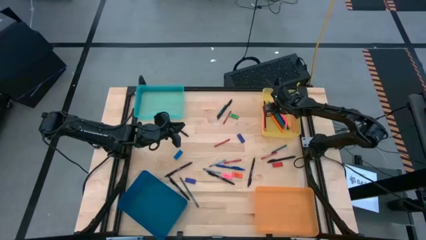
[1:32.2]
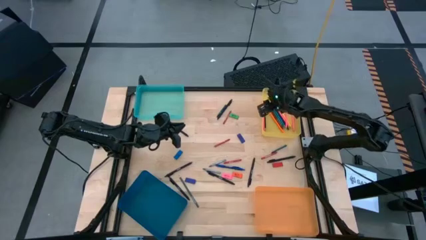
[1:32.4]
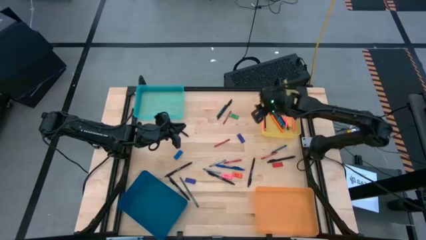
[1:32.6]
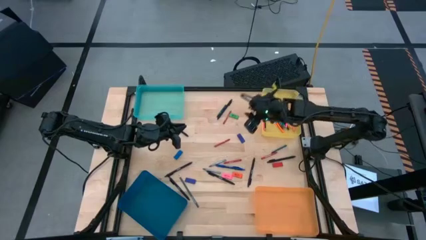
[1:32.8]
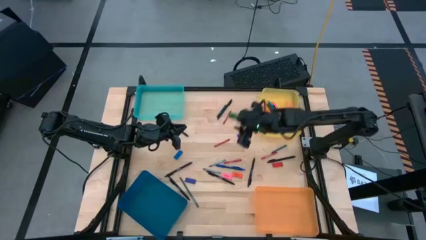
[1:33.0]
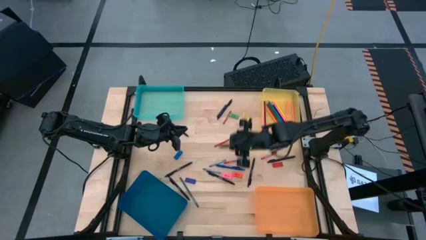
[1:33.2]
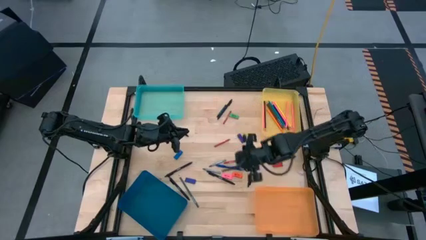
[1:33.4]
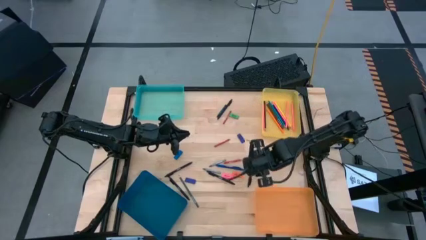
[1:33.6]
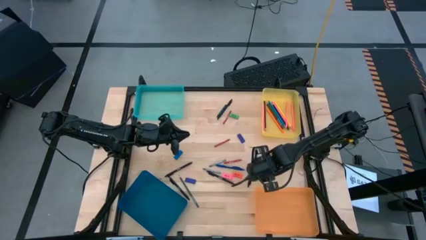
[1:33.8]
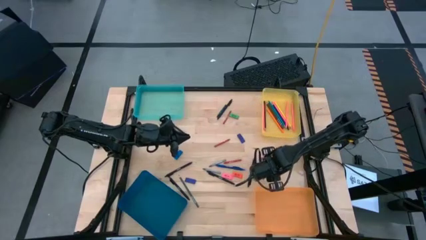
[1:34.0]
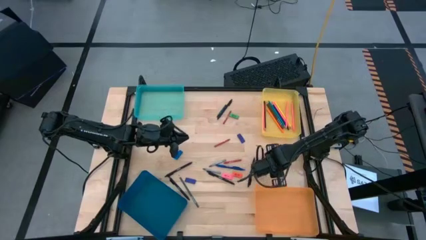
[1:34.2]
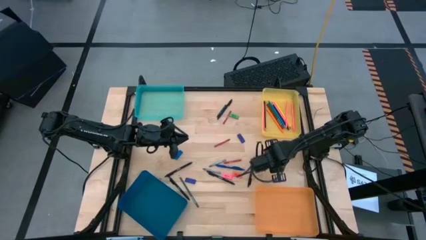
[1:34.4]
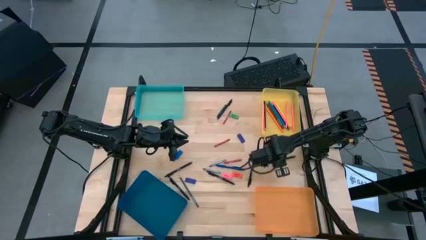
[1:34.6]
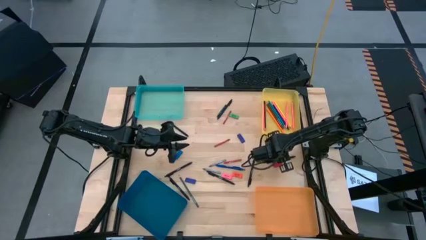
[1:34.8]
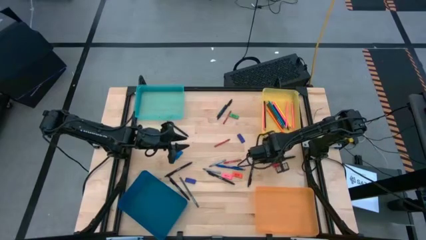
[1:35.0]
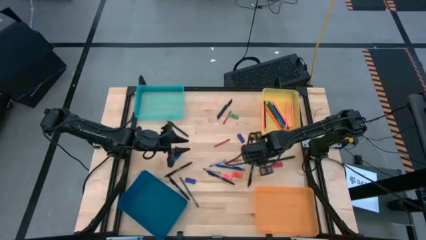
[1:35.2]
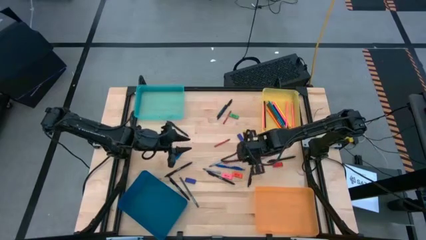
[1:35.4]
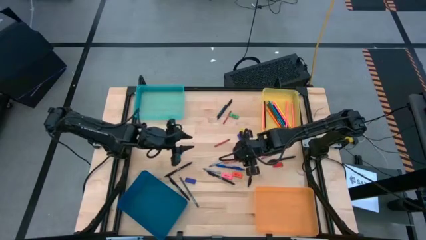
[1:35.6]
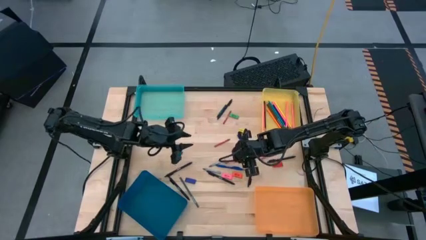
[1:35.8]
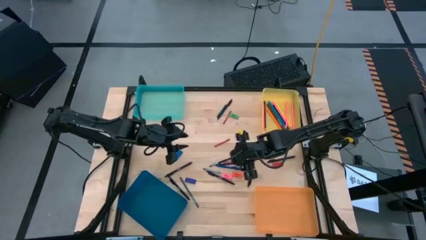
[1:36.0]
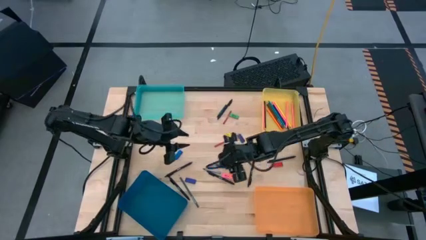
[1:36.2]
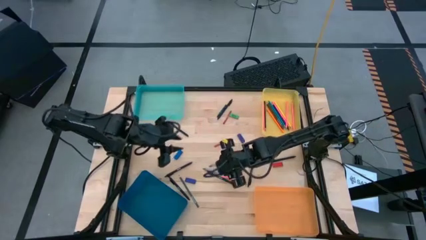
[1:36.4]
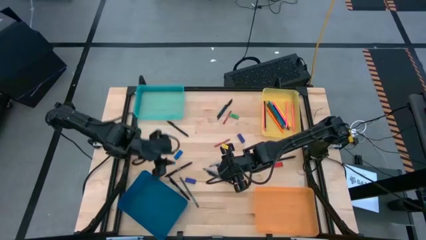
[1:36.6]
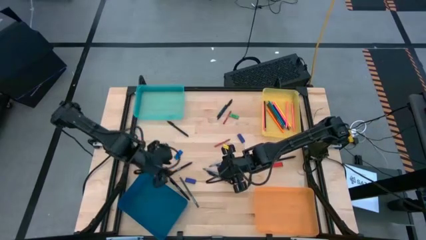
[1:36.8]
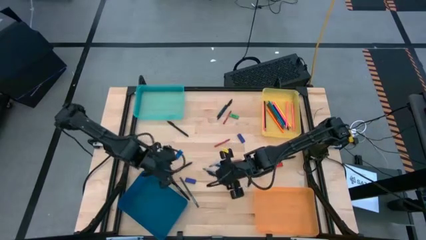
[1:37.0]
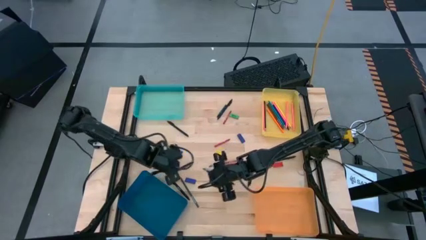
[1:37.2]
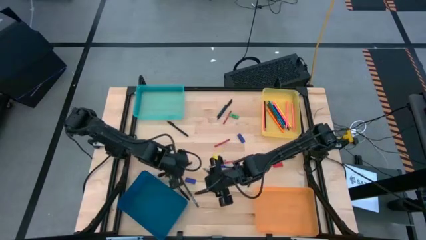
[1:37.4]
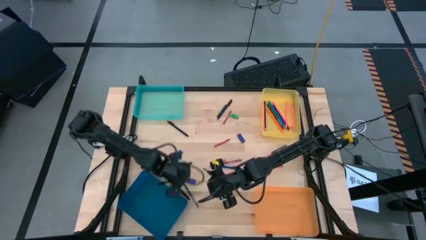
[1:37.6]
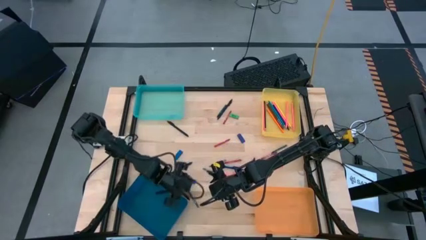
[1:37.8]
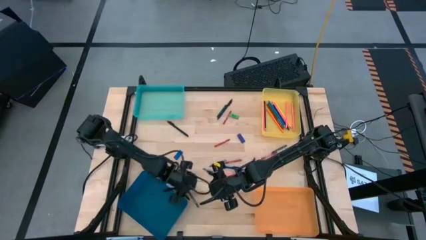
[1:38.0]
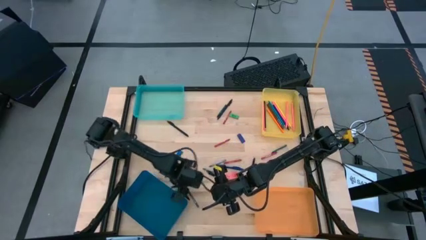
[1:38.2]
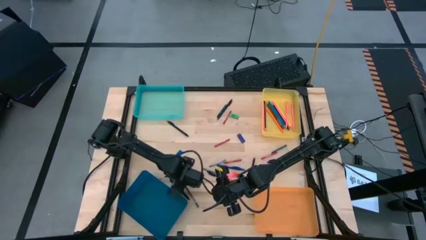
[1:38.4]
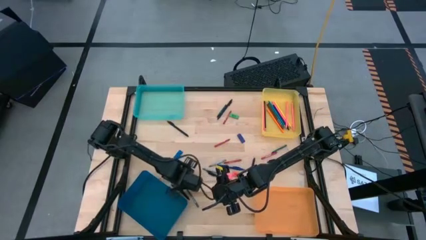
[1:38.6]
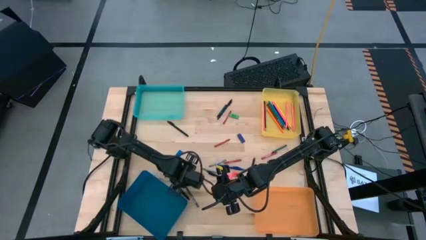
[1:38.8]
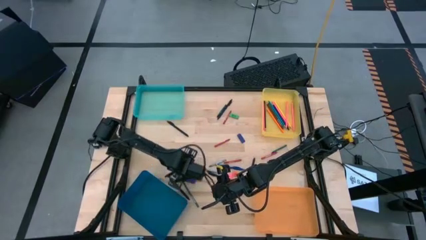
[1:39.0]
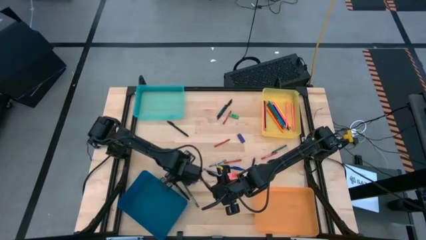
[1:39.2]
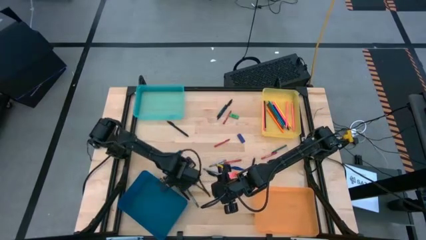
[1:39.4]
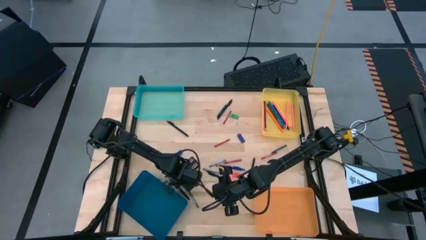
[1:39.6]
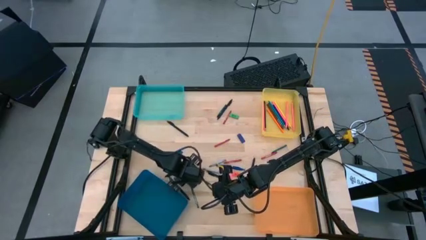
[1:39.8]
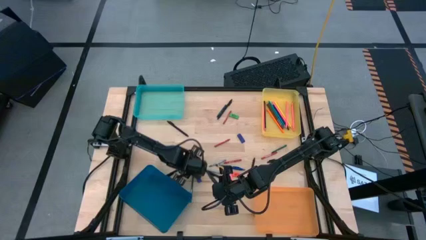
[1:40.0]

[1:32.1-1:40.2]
Task: Sort crayons/erasers/pens/pencils in bins
Adjust the green pencil

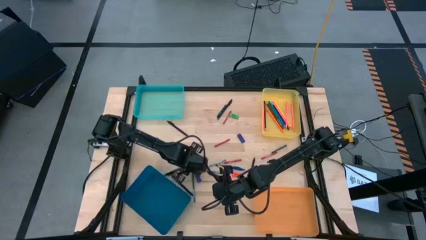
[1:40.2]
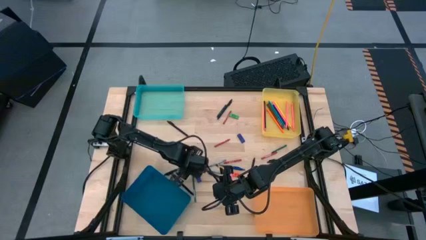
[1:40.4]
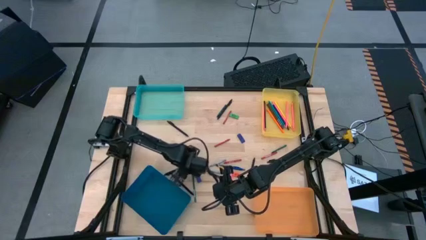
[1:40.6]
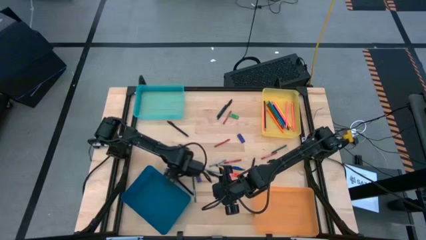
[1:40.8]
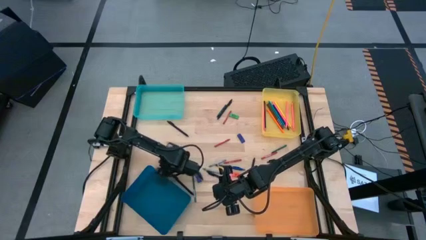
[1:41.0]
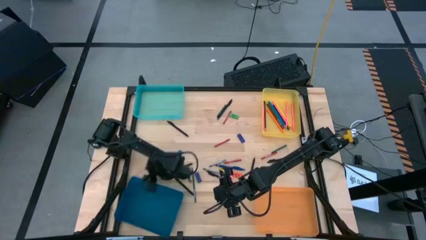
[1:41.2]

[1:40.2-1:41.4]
Adjust the blue bin

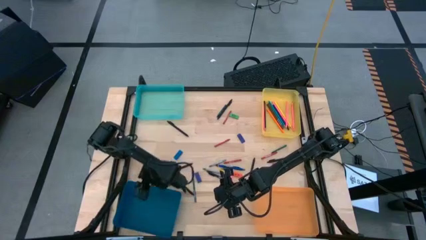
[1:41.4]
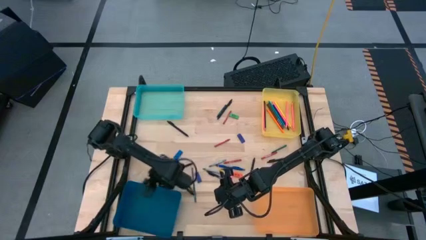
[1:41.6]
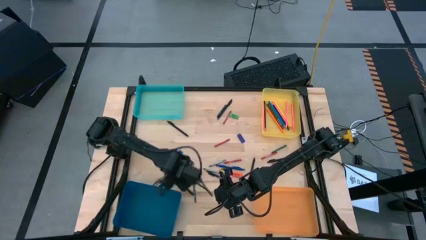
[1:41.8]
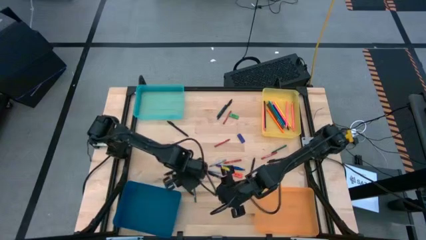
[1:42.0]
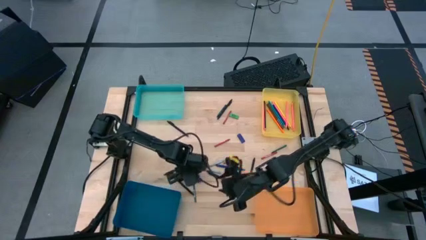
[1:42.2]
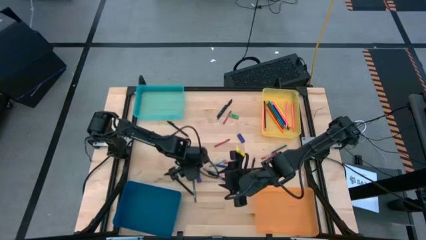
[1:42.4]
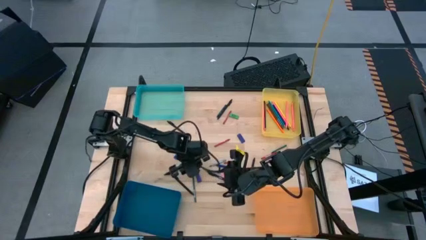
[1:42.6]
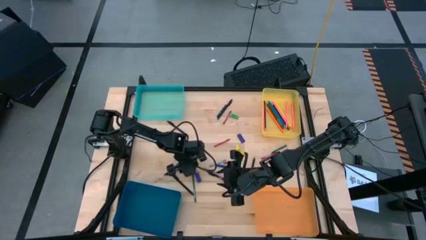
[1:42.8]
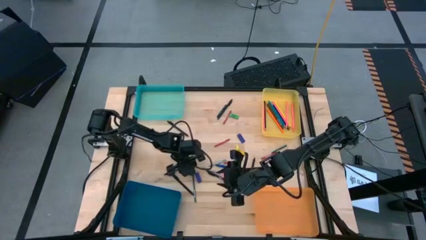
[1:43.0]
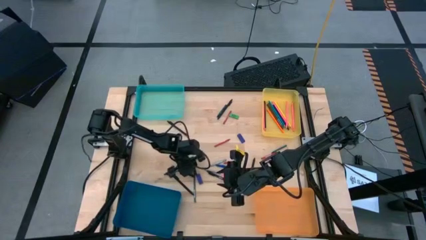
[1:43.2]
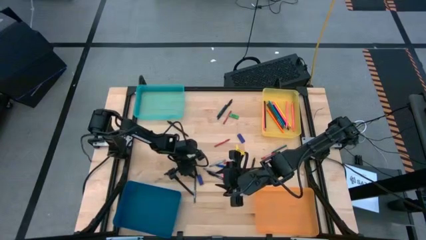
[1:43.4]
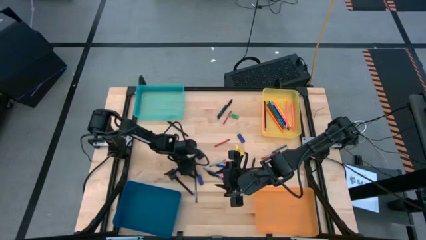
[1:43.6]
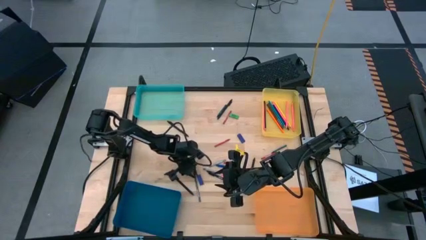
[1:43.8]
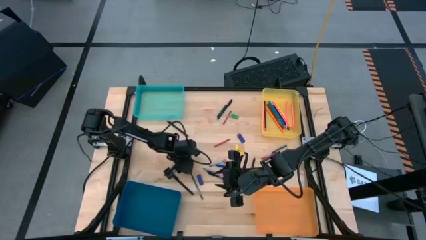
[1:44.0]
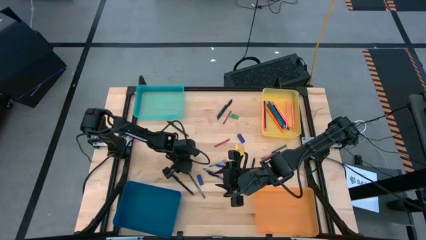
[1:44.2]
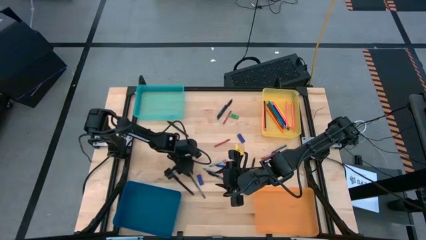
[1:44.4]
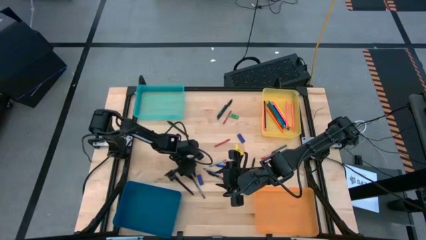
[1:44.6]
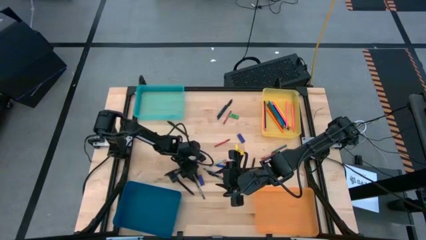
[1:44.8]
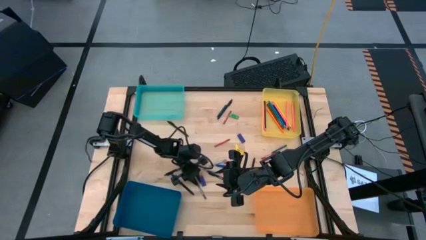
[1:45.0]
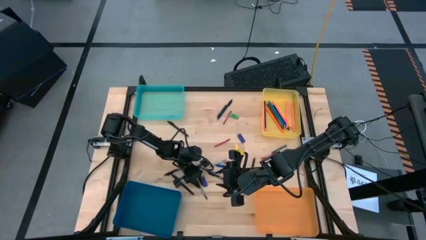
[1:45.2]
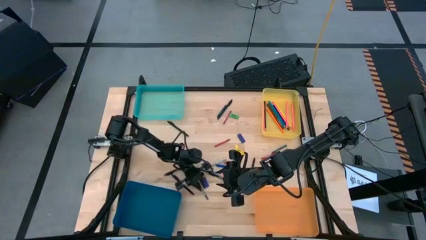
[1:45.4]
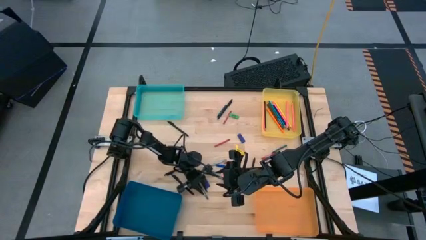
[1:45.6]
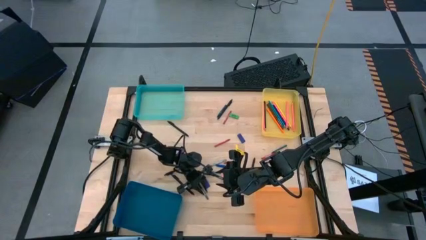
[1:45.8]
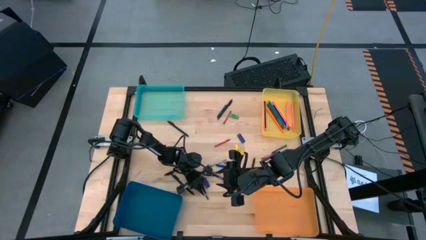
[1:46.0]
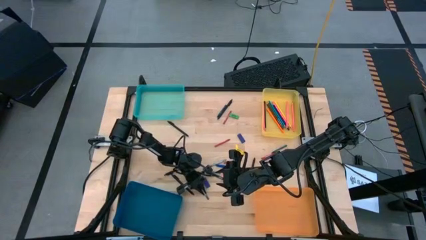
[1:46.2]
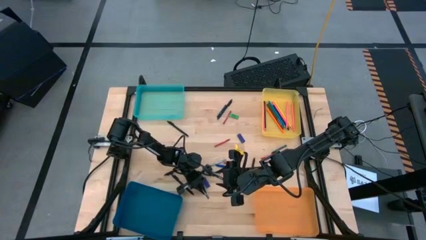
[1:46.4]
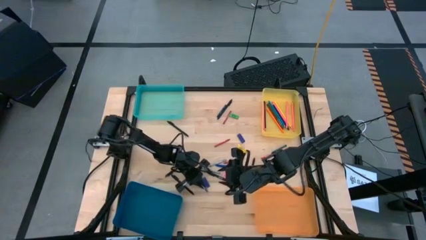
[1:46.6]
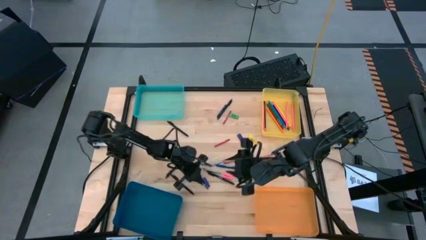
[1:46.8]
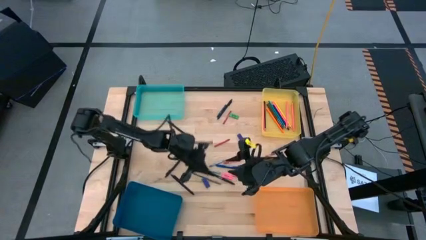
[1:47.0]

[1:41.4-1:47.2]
Put the green pencil into the yellow bin

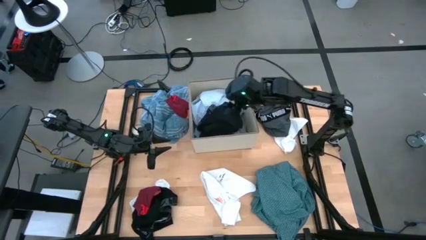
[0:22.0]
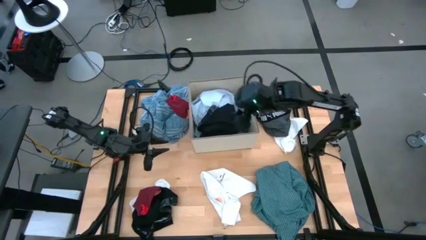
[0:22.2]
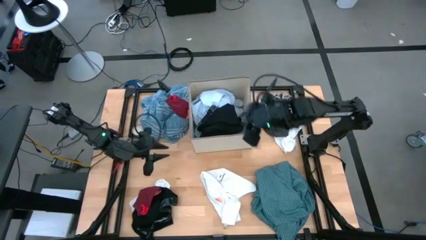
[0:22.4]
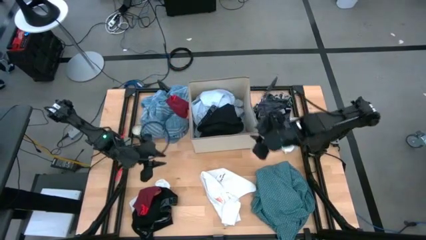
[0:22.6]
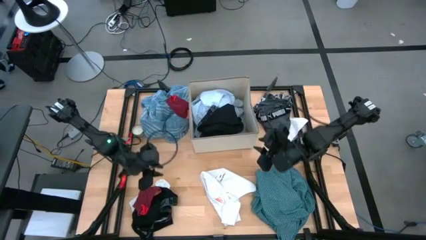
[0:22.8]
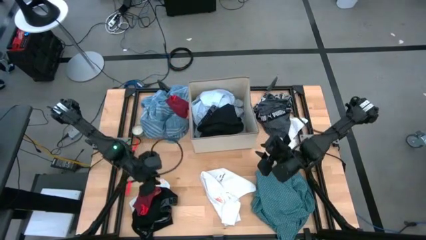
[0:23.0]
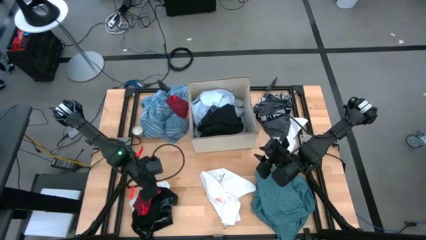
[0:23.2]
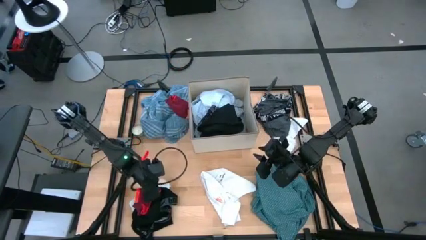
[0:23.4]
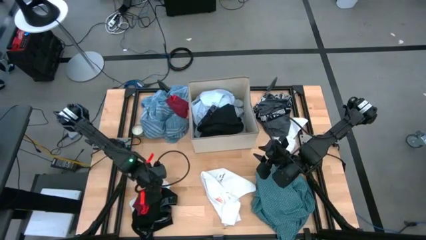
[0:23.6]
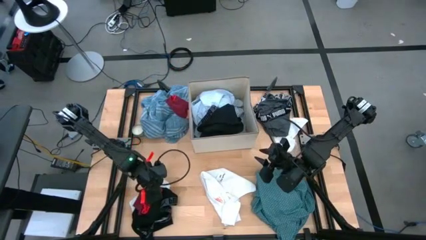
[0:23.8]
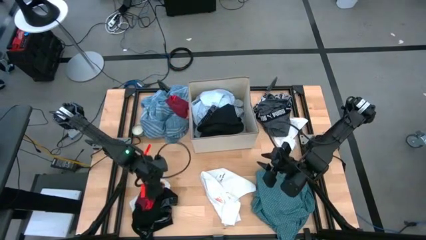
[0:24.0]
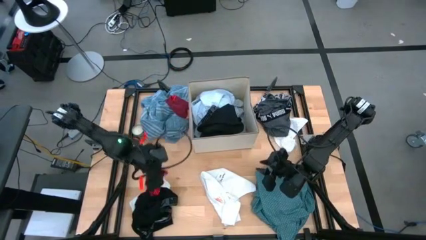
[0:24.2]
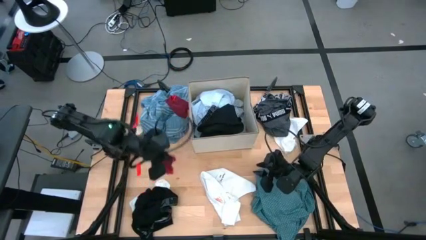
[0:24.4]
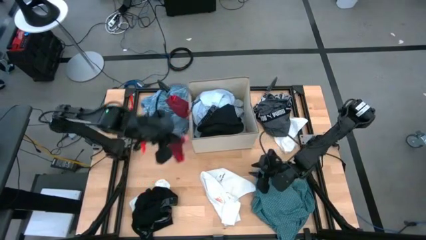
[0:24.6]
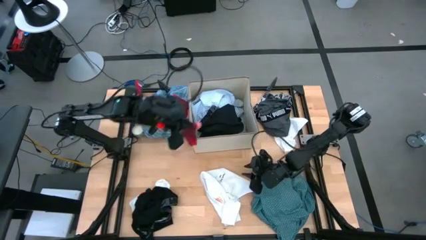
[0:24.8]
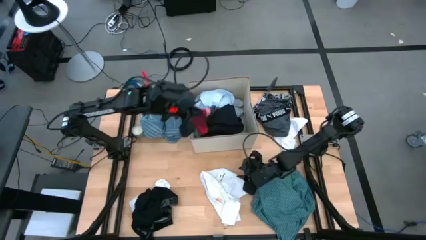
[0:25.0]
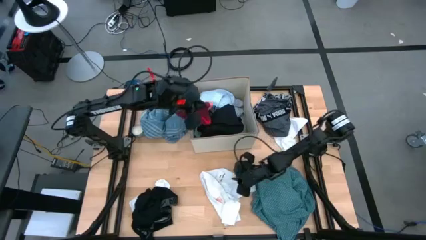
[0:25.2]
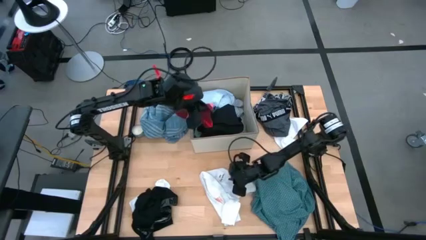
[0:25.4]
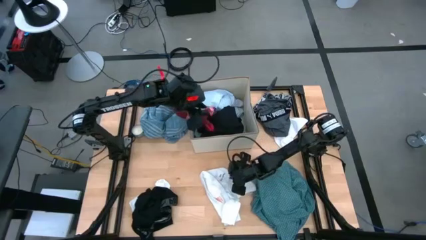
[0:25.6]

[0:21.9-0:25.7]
Task: Sort clothes
Put the bottom red sock into the bin
